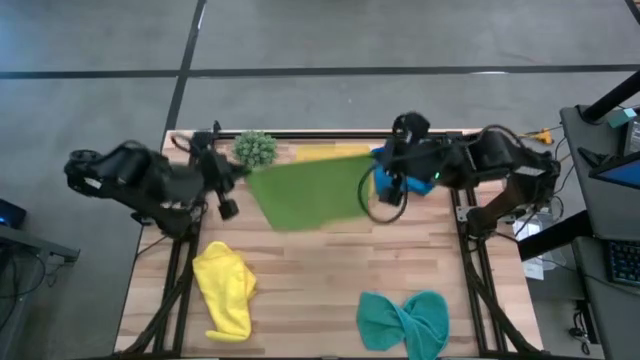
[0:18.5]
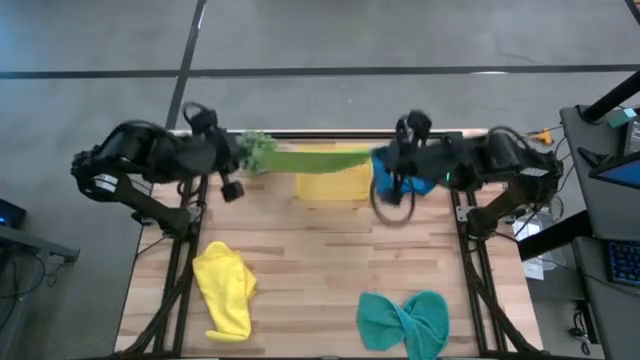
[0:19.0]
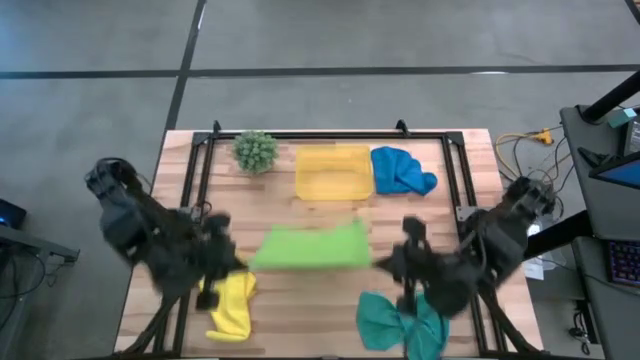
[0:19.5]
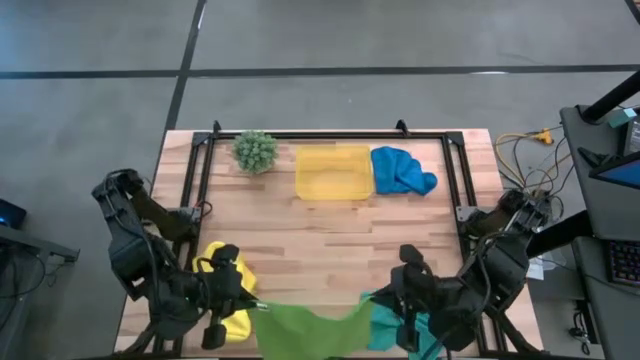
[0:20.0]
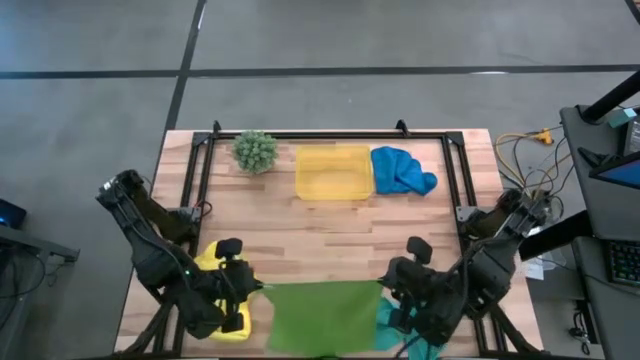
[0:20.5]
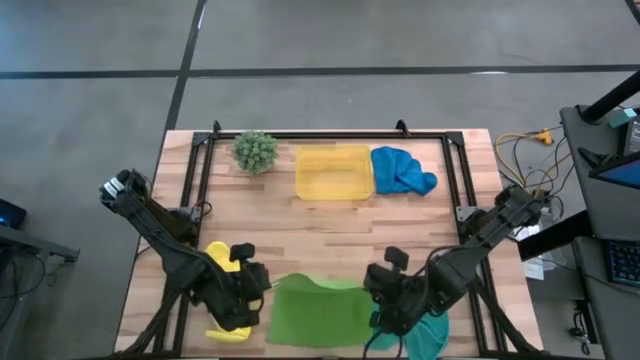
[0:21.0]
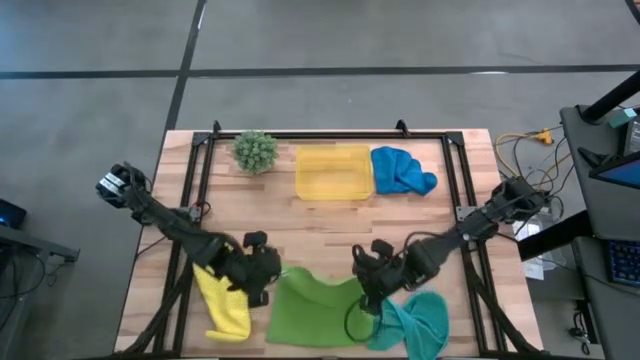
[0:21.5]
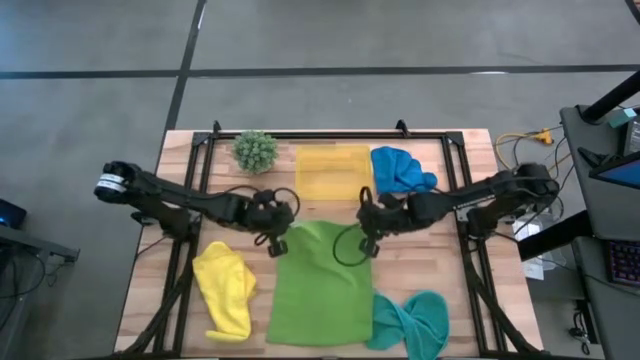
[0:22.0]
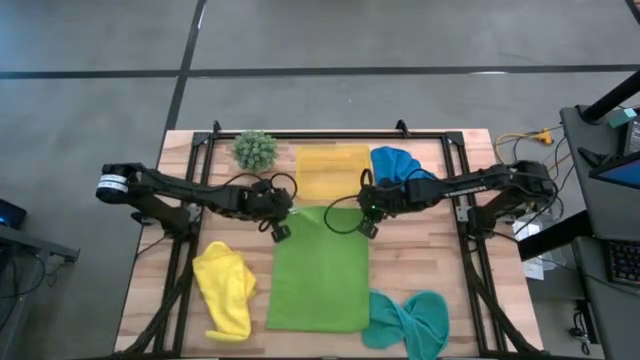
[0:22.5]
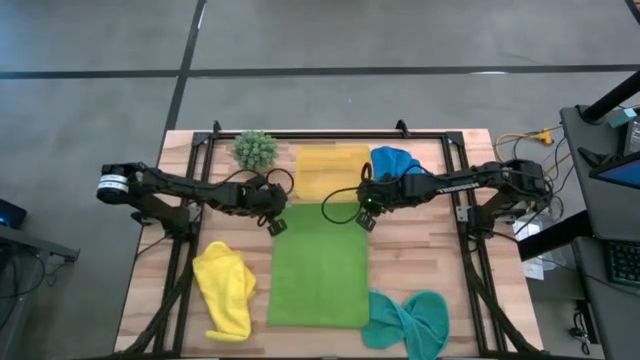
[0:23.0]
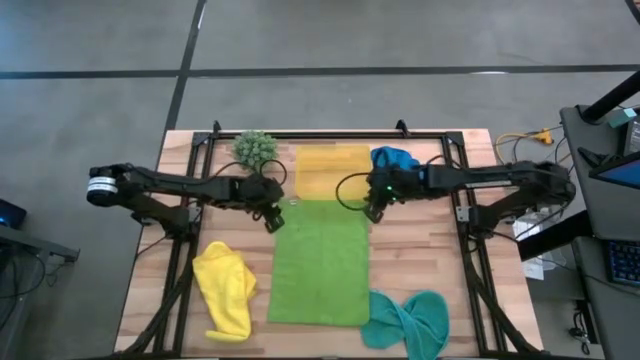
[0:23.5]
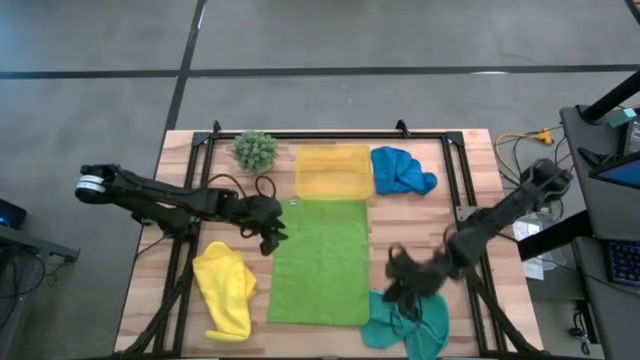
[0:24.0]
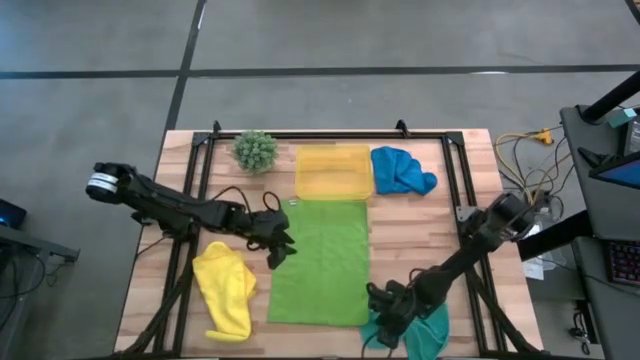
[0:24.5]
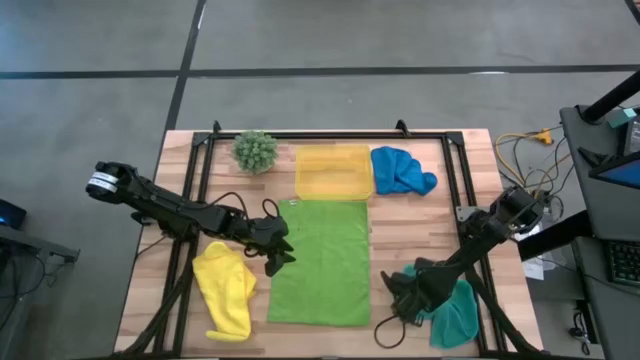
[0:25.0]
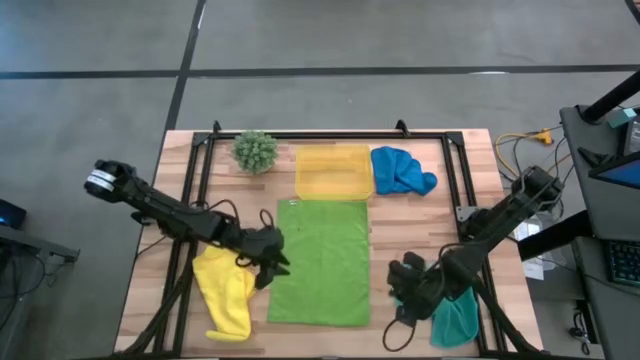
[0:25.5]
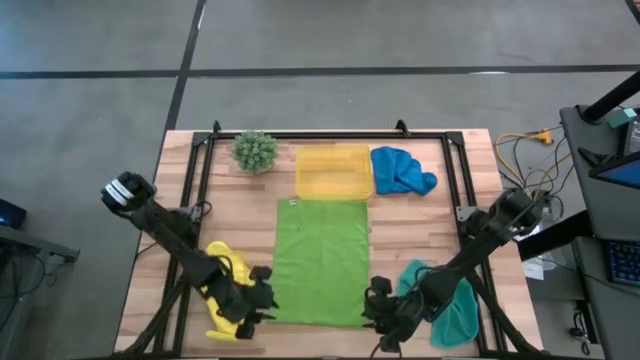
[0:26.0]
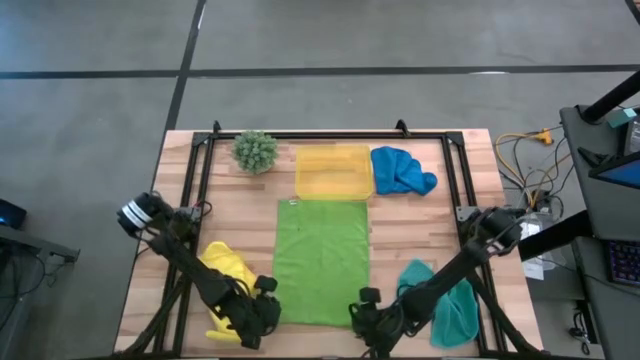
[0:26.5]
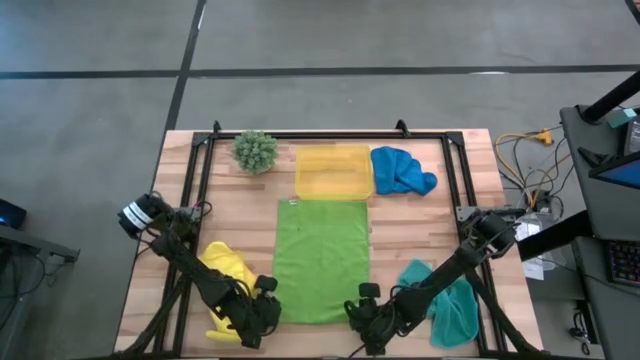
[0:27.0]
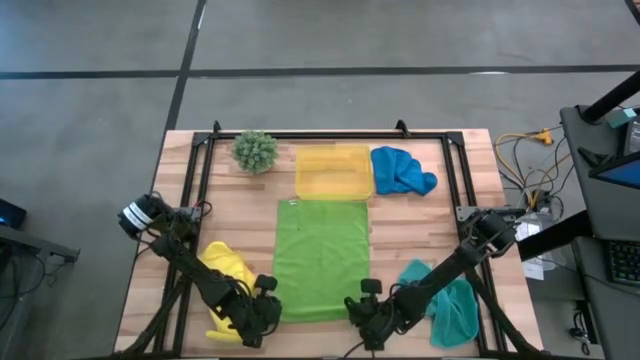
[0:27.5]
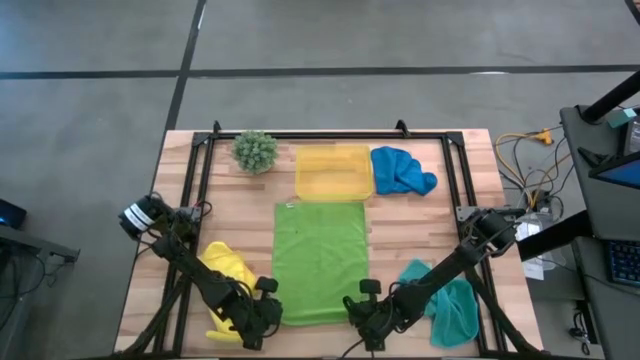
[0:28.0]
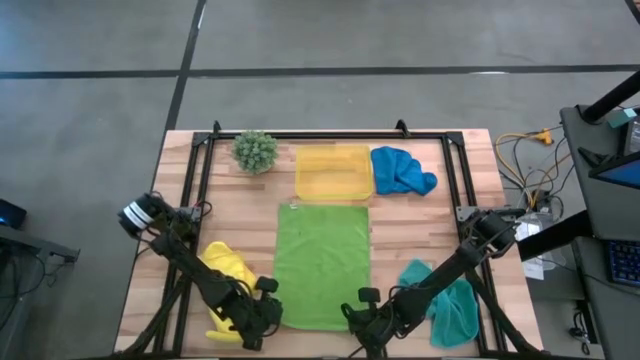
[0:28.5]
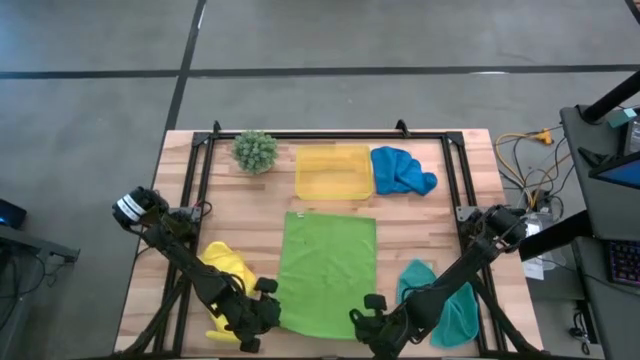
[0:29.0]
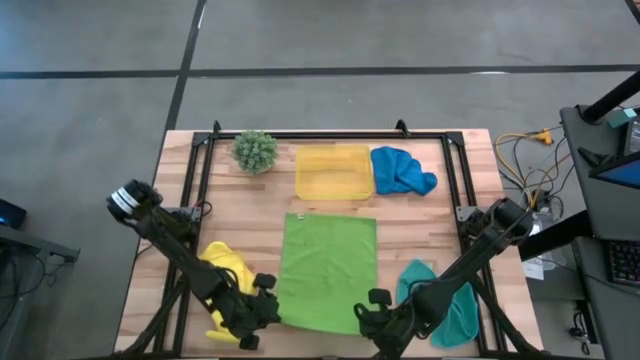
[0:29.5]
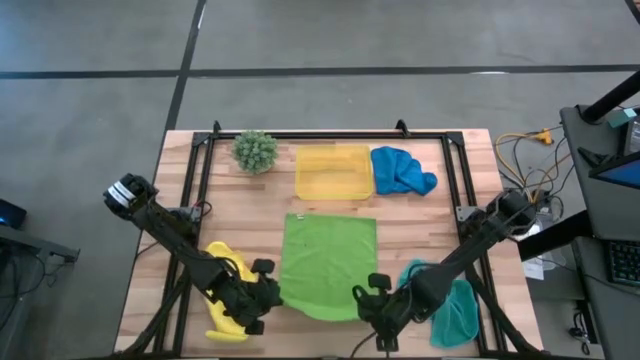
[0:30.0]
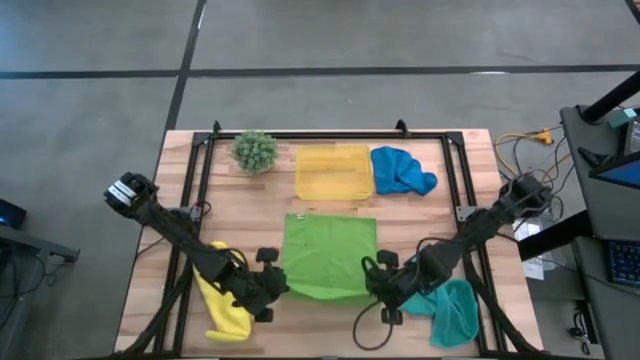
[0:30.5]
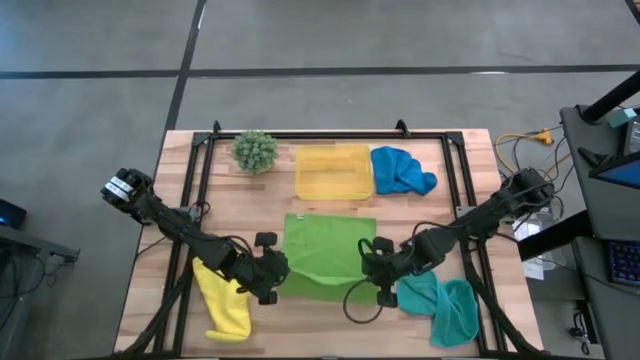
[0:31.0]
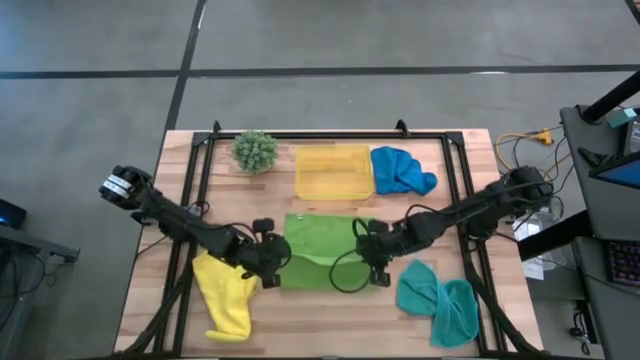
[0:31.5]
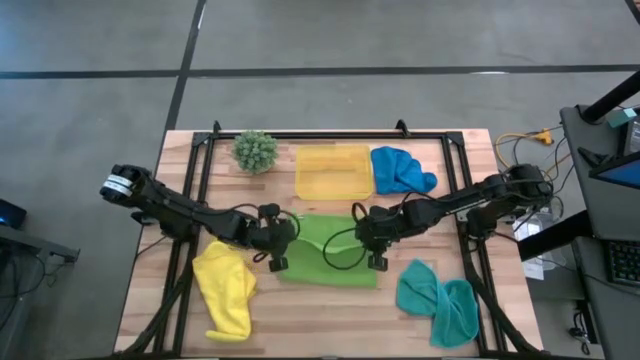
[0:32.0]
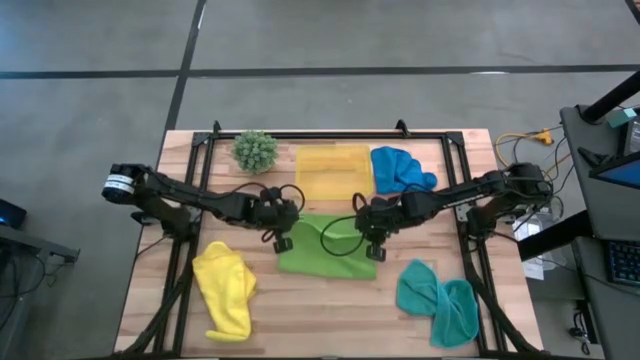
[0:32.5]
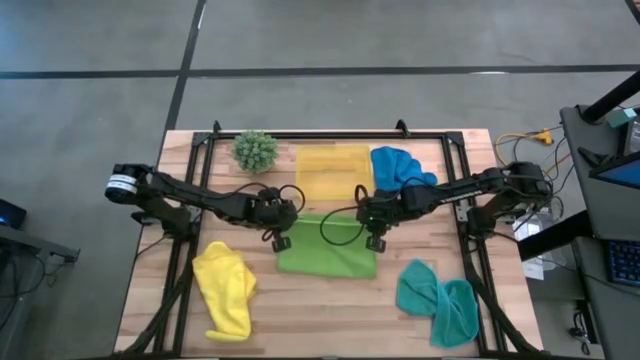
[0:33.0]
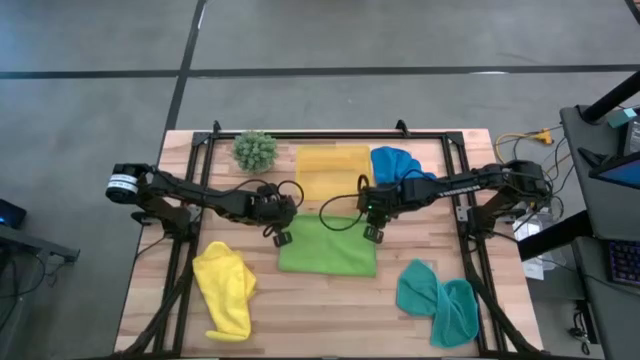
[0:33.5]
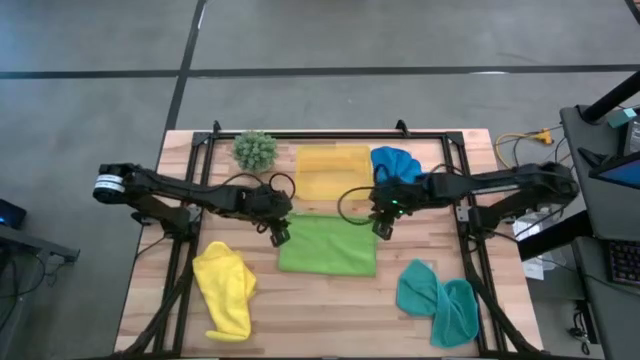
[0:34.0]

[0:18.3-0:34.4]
Task: Fold microfiber towels
Fold the green towel

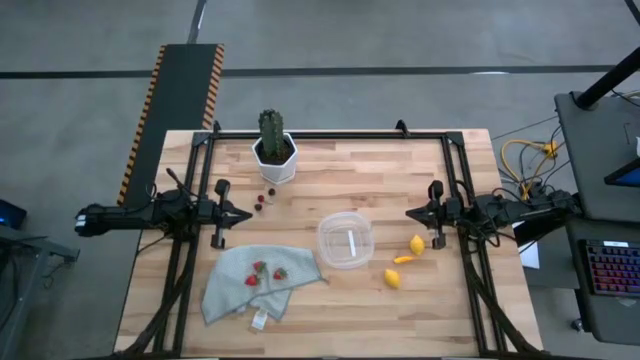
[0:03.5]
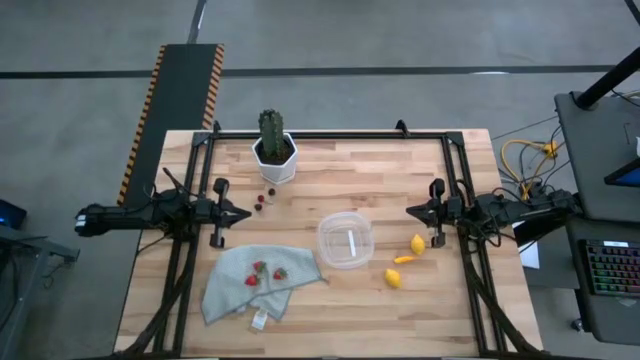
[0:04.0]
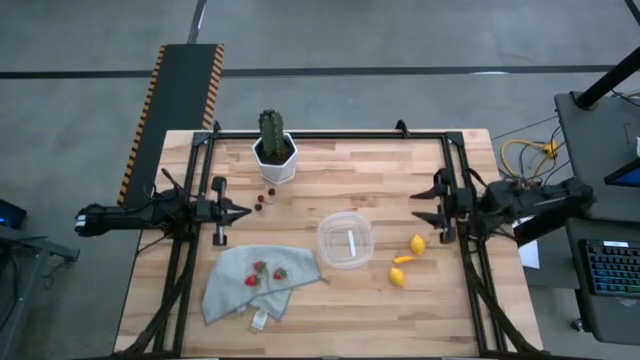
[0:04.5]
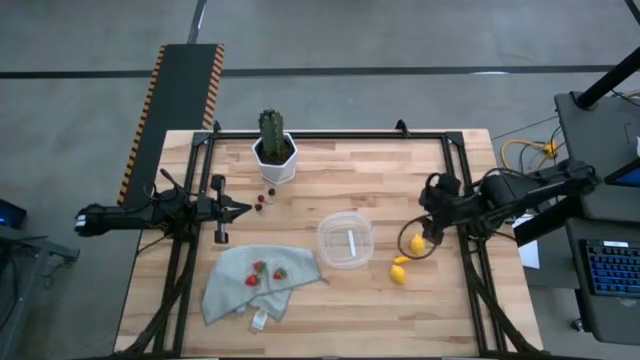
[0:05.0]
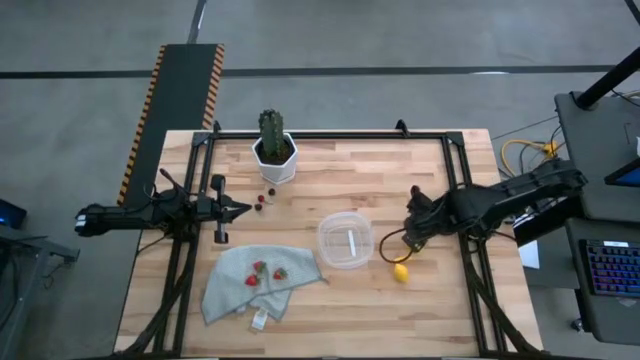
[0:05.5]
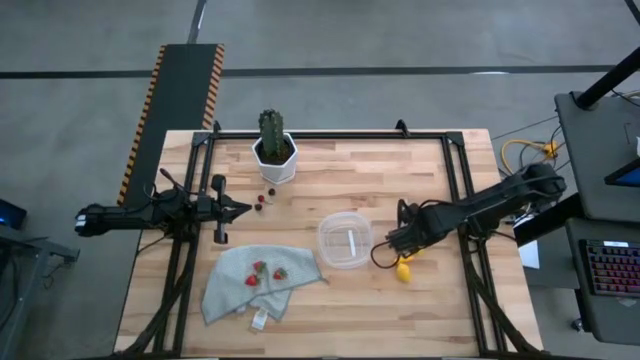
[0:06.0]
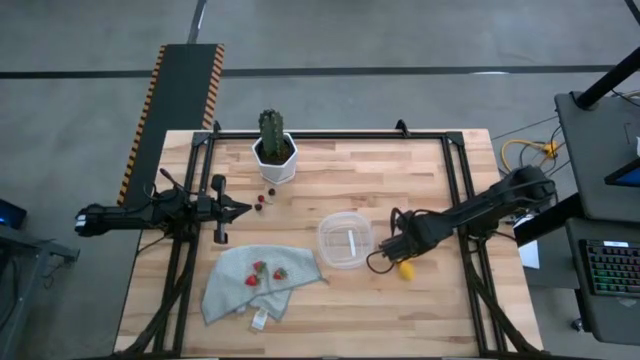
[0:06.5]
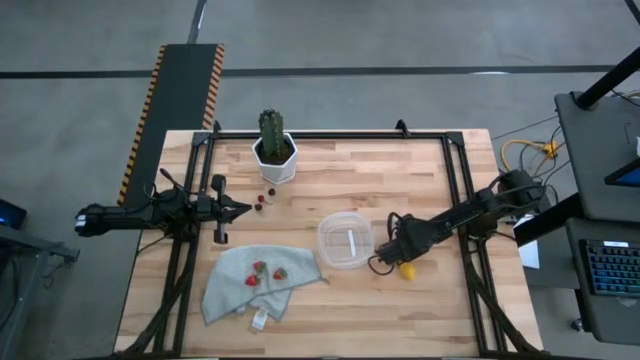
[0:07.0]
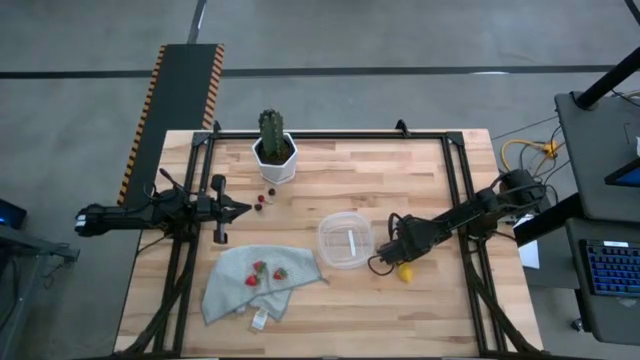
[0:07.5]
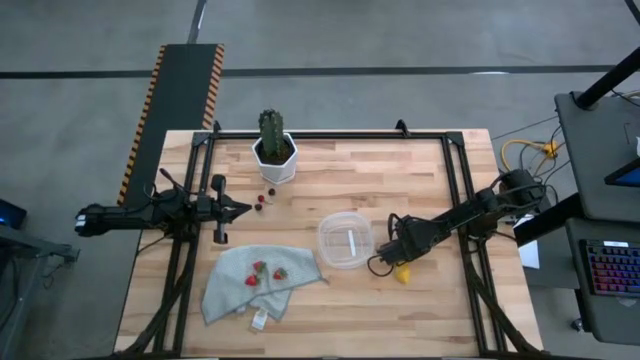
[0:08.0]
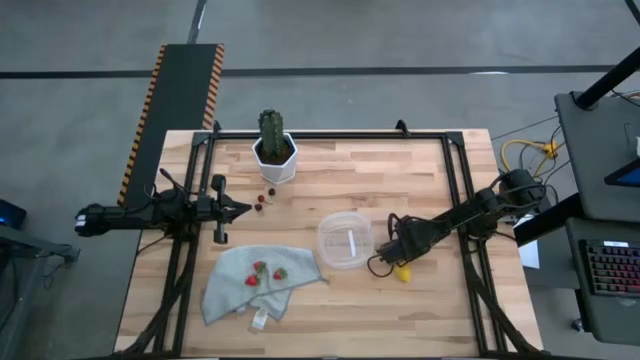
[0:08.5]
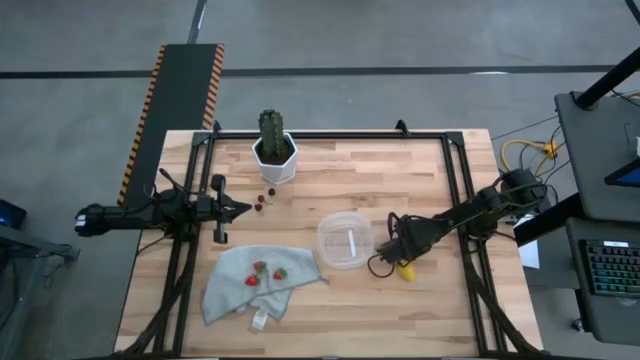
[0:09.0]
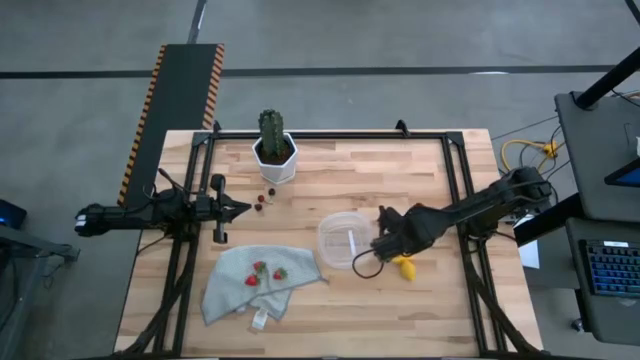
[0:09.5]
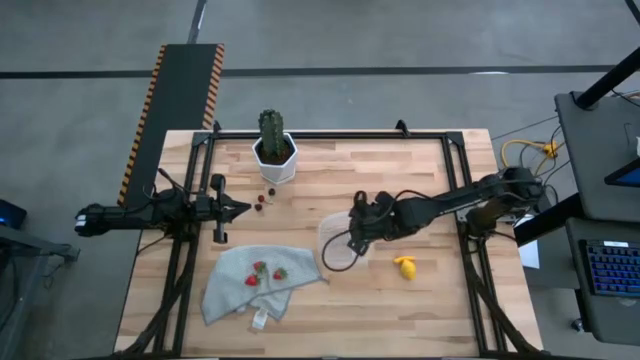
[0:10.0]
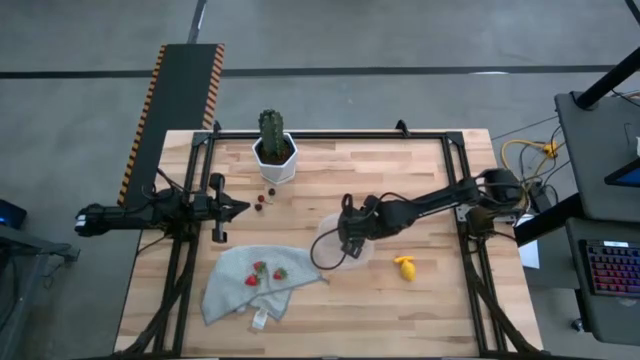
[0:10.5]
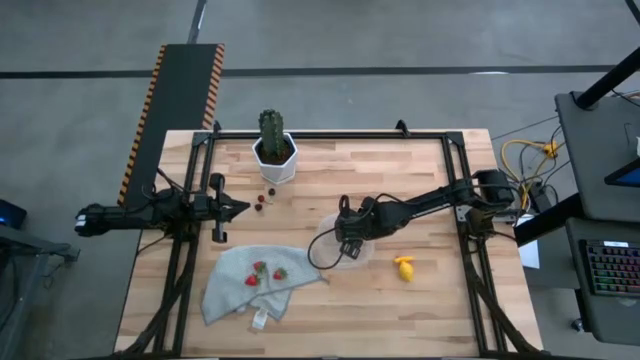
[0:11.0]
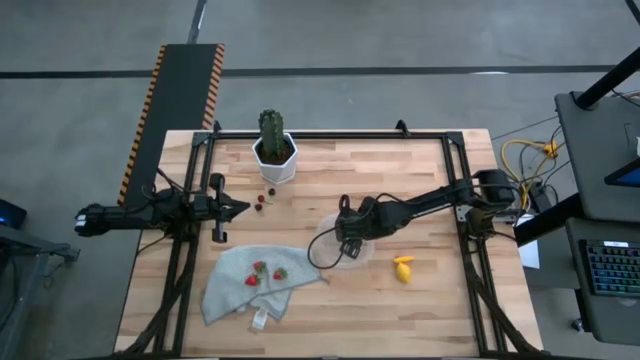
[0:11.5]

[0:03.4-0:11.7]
Task: Pick and placing Produce into tupperware
Put the top yellow lemon into the transparent container
